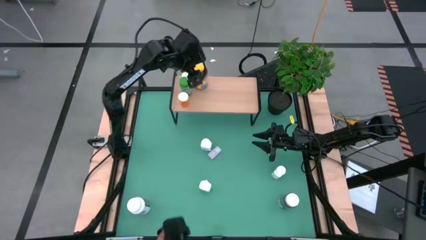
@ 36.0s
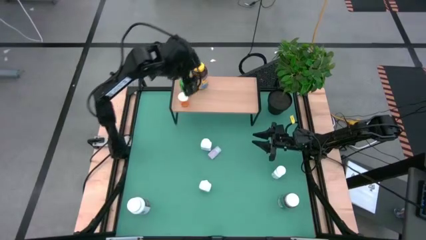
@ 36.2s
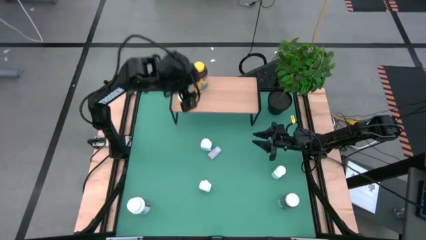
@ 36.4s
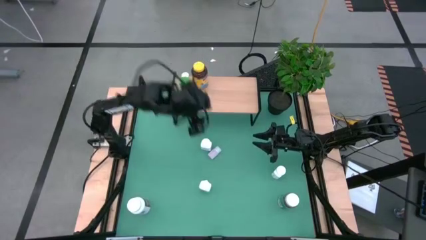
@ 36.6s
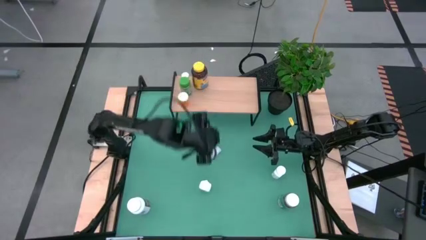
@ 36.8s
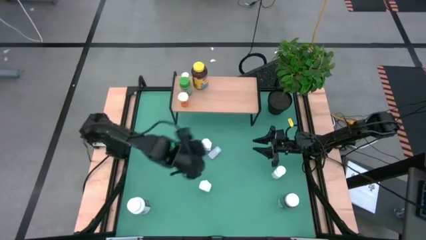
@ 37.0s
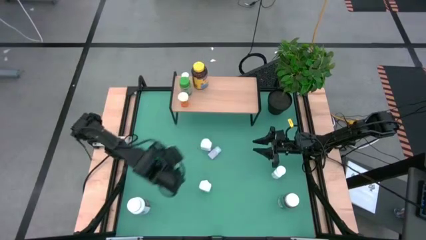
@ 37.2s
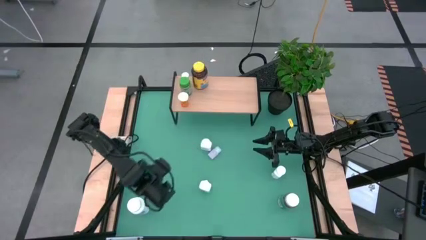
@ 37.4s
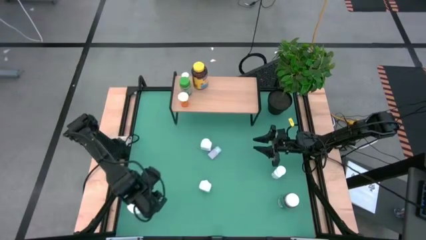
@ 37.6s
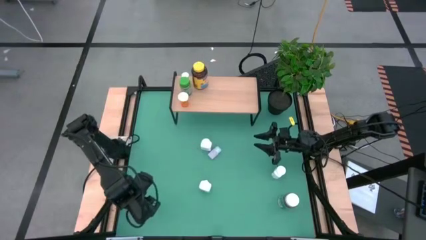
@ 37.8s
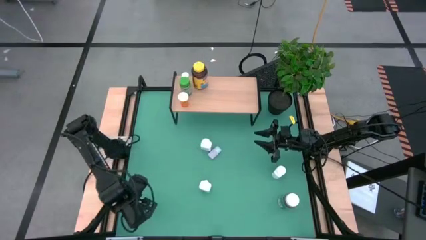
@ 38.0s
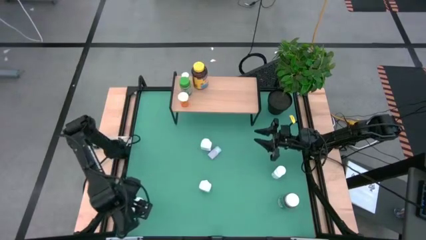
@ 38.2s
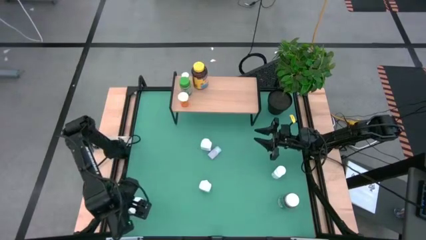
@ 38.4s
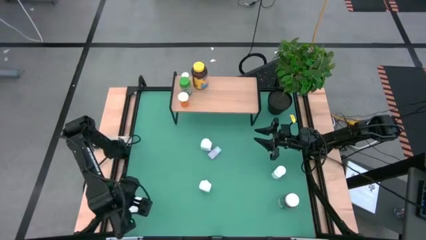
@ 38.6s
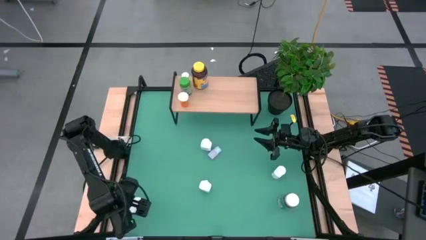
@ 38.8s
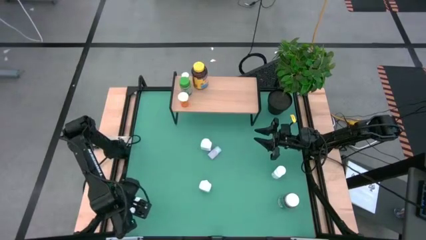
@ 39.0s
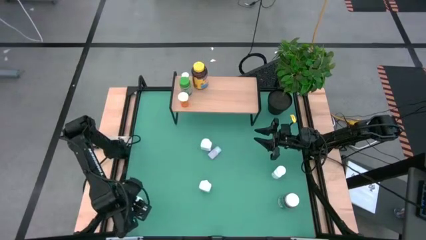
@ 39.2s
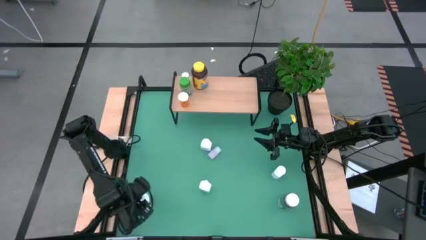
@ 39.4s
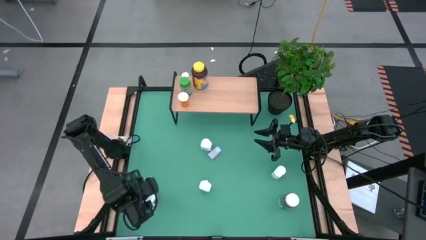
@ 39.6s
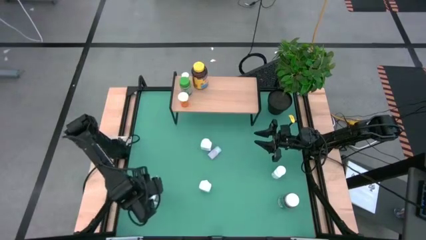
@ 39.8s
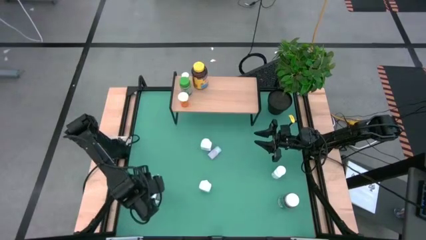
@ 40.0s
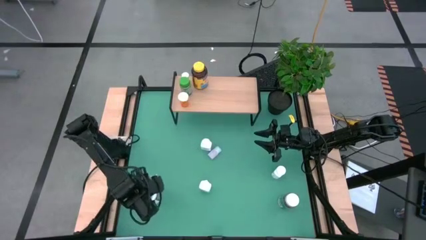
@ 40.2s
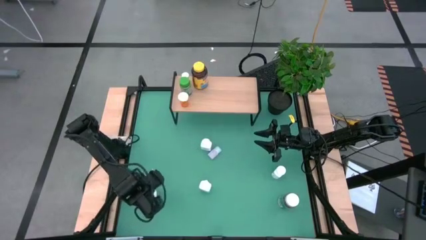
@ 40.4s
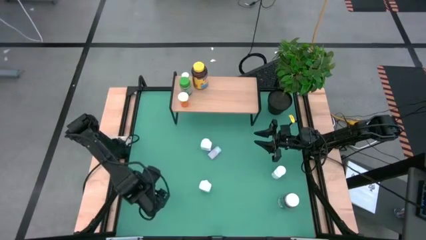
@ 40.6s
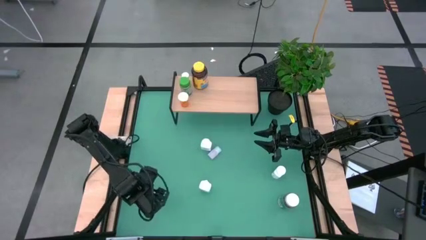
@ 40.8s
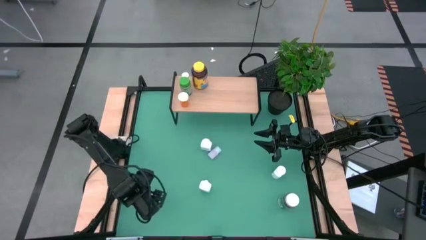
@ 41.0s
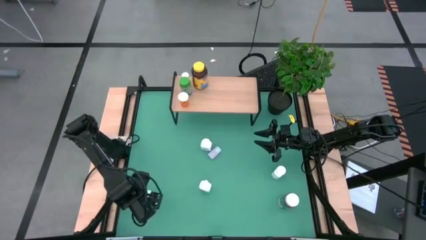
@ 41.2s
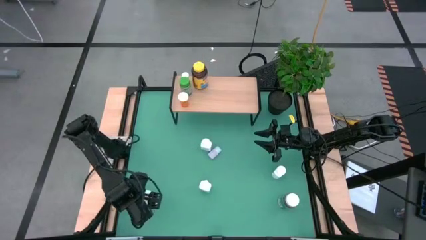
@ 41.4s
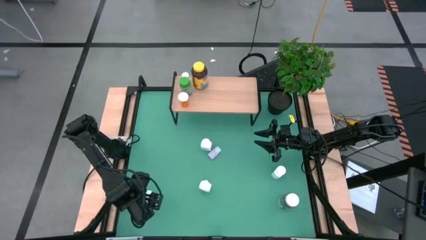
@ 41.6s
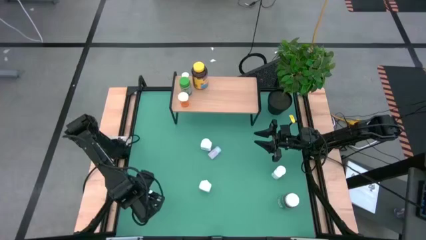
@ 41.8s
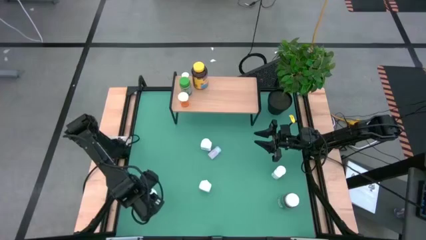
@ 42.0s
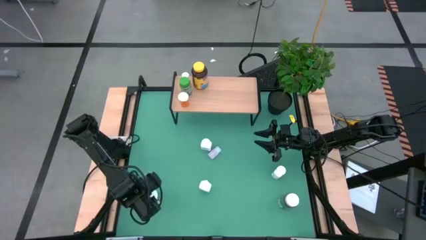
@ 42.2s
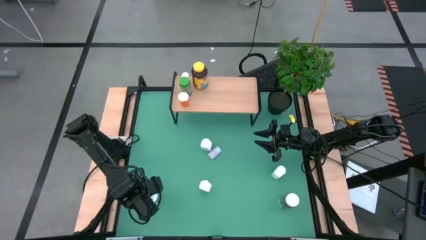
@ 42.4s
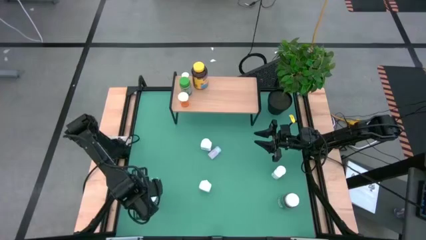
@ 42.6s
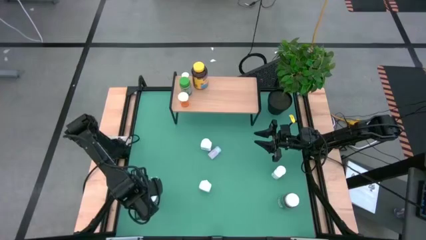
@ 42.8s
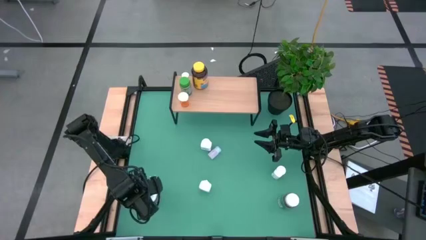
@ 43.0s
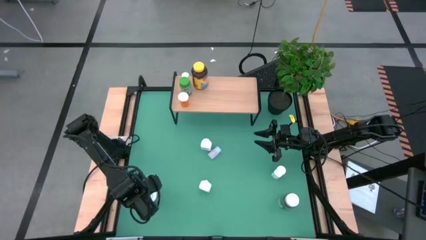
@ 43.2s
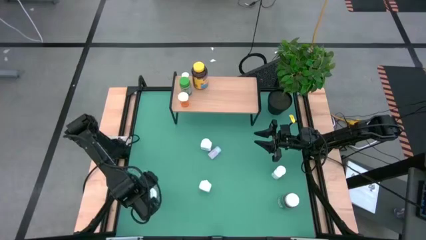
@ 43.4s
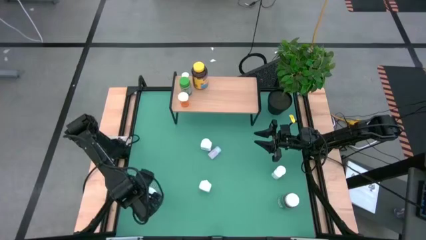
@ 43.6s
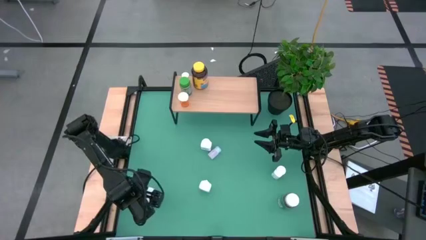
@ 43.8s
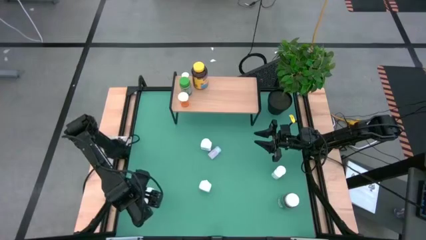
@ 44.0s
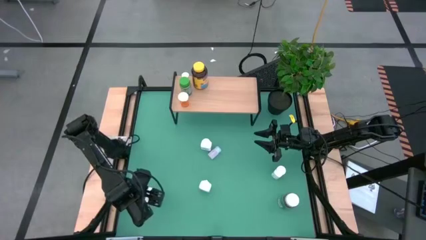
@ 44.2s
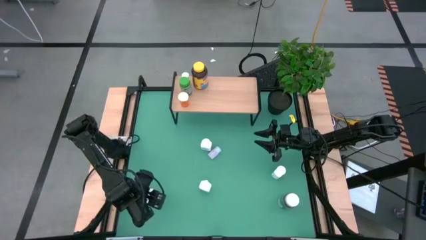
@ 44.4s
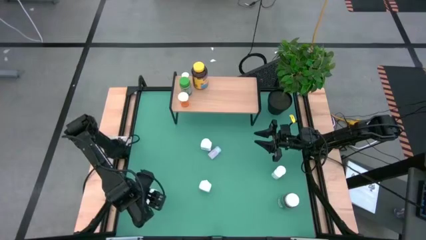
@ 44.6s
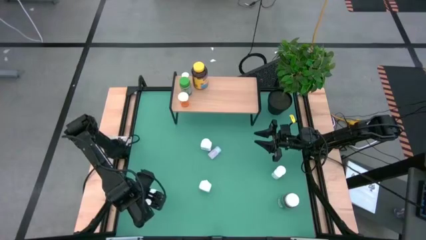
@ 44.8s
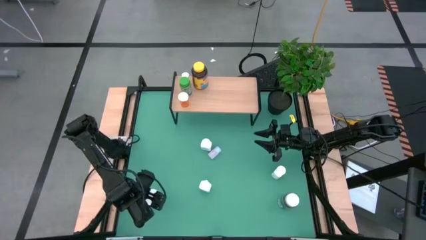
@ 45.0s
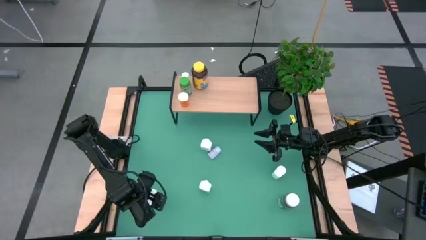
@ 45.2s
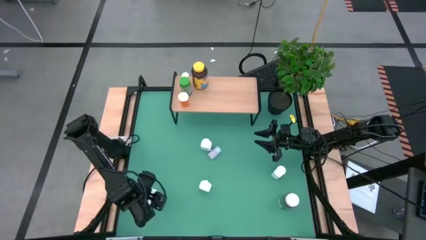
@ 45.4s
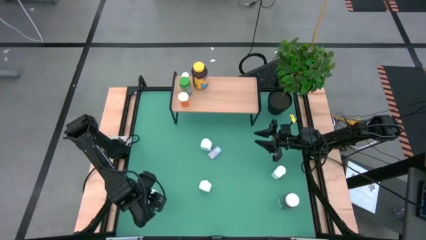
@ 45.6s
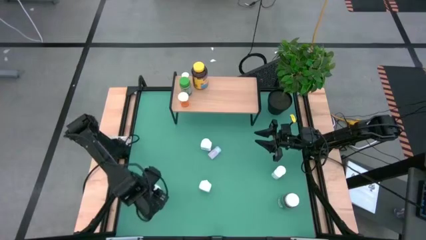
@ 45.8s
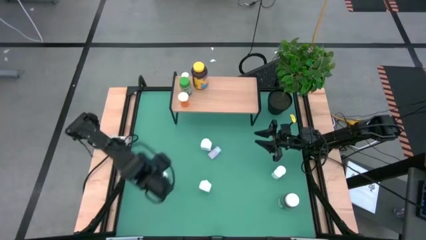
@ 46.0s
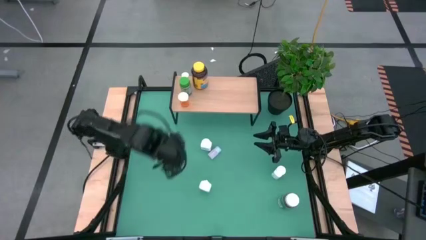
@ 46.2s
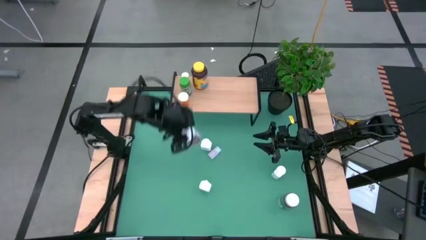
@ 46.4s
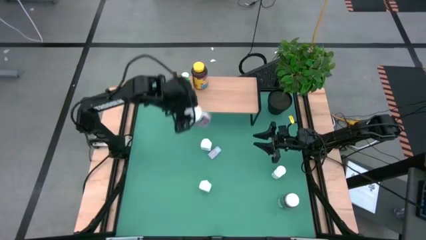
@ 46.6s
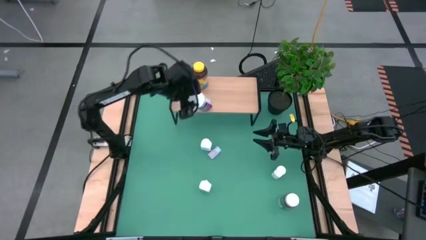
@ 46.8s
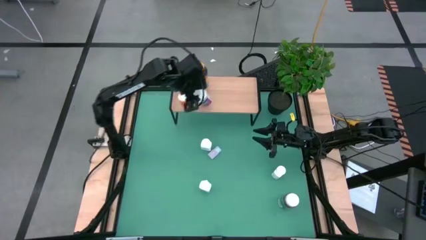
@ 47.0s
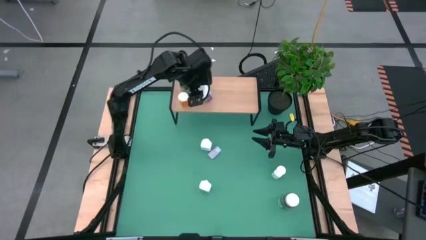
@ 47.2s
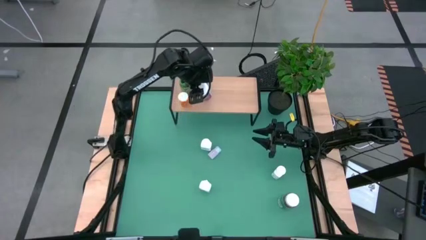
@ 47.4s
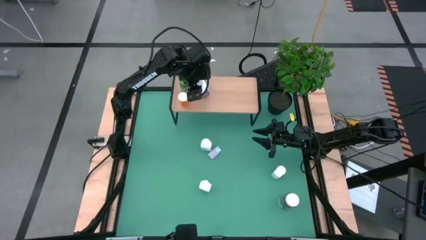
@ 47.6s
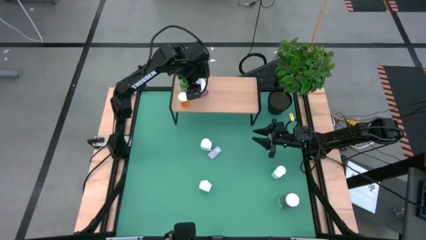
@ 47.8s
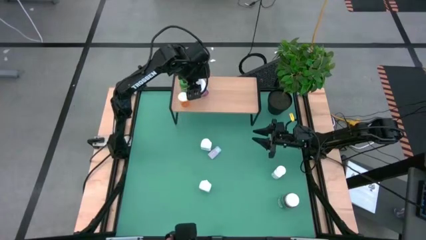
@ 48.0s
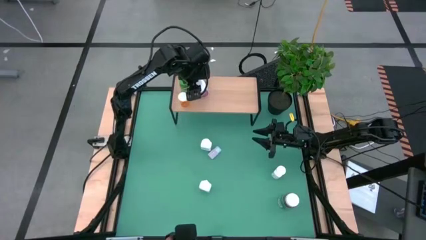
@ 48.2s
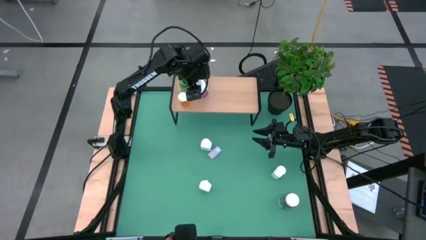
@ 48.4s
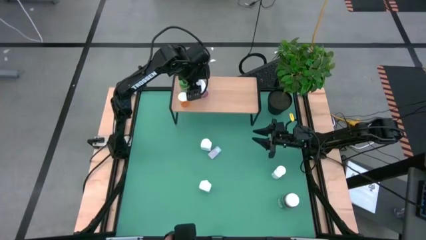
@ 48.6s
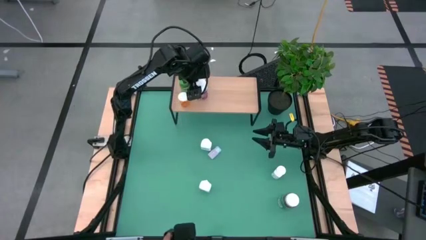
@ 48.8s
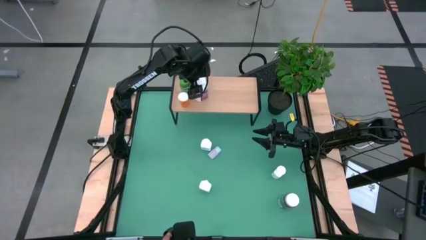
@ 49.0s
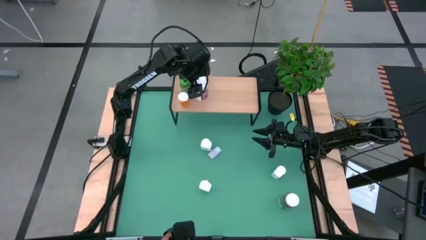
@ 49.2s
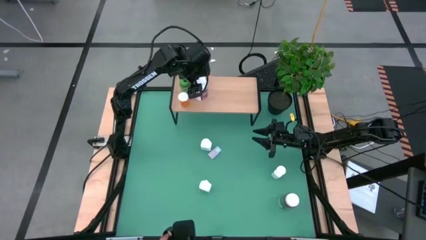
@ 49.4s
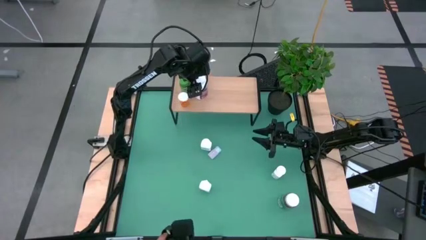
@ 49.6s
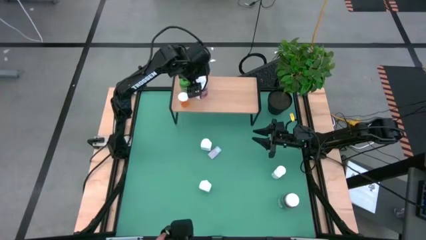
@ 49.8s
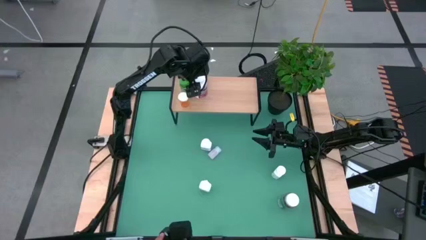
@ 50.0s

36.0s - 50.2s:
Task: Pick and place medicine bottles onto shelf by color
Put the purple and white bottle on the shelf

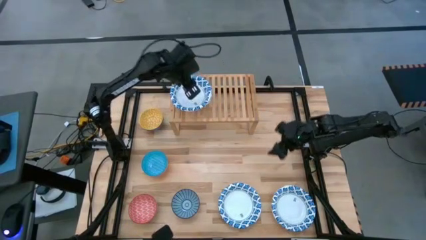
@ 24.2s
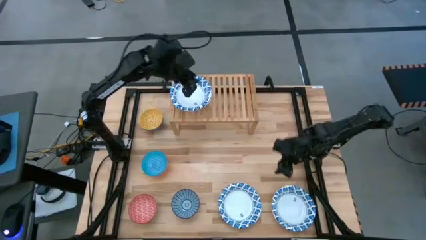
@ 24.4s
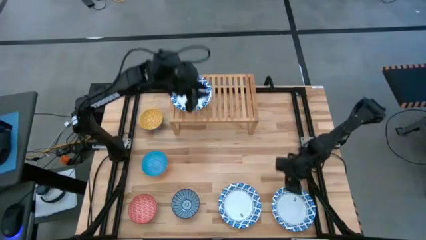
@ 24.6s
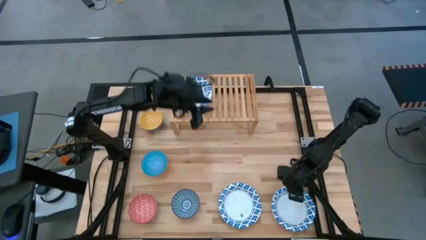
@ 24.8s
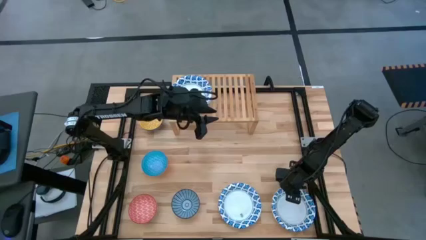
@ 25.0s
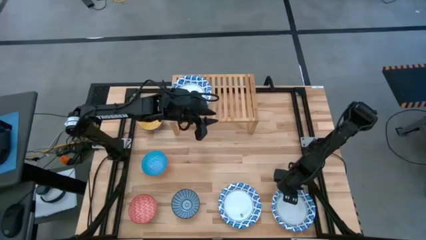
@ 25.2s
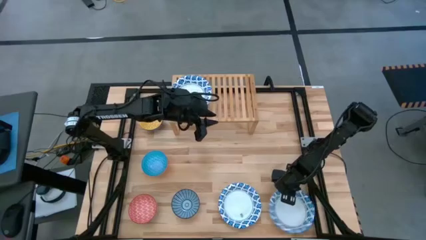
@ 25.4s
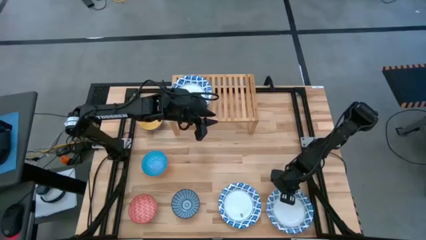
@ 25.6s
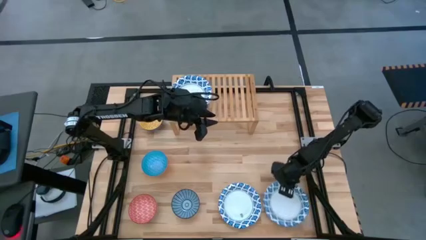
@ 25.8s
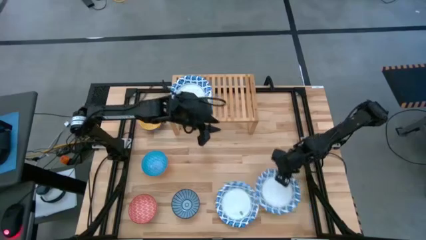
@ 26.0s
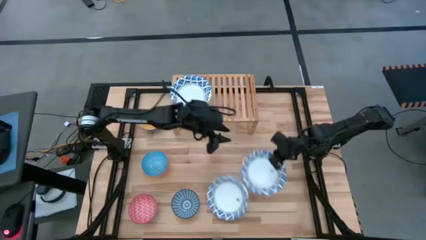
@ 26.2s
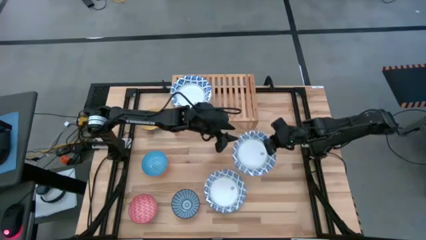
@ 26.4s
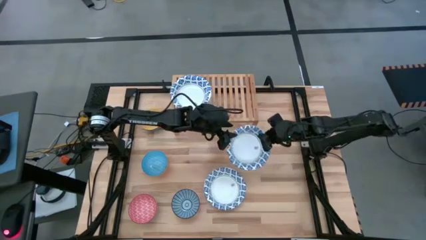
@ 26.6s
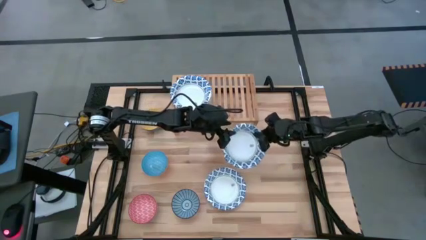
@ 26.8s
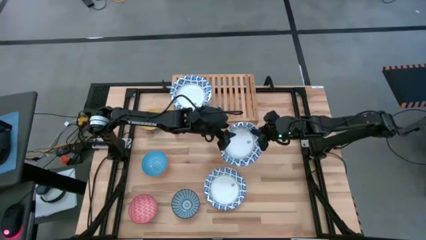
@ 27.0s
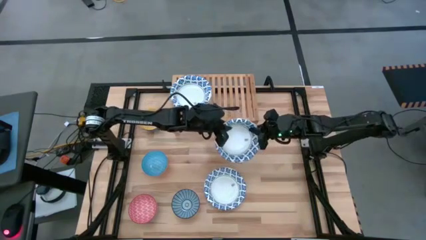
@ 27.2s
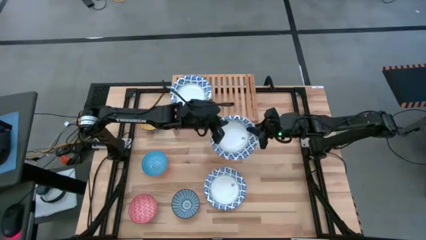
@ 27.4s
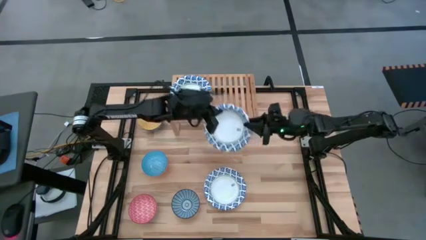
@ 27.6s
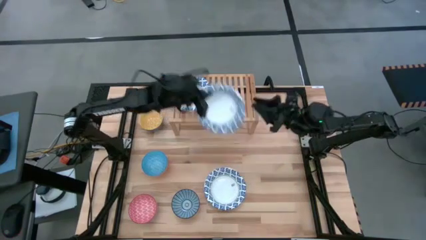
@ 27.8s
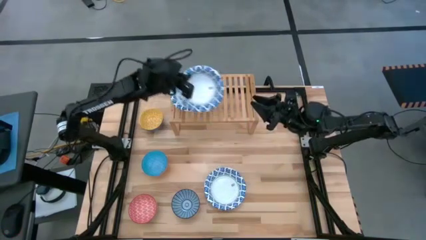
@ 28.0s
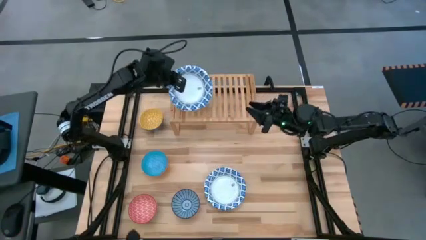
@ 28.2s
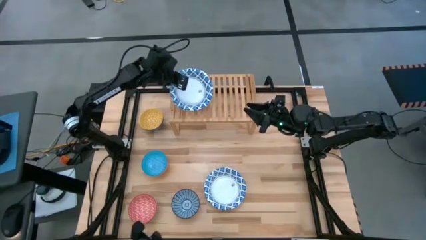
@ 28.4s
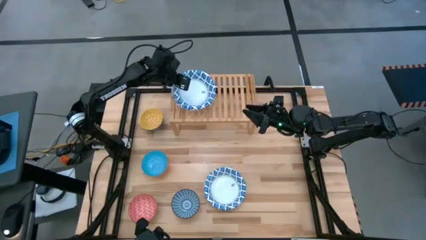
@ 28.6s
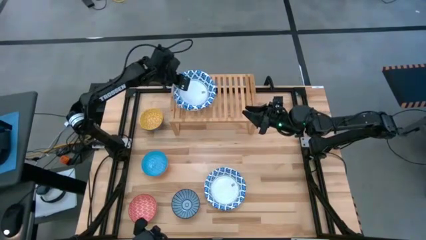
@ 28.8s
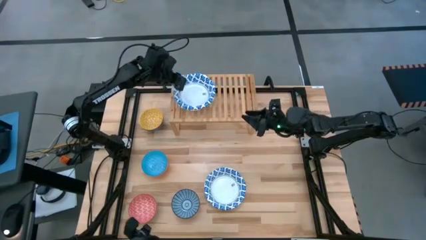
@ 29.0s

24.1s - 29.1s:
Task: Place and stack bowls onto a shelf
Stack the white patterned bowl on top of the other white patterned bowl on the shelf
